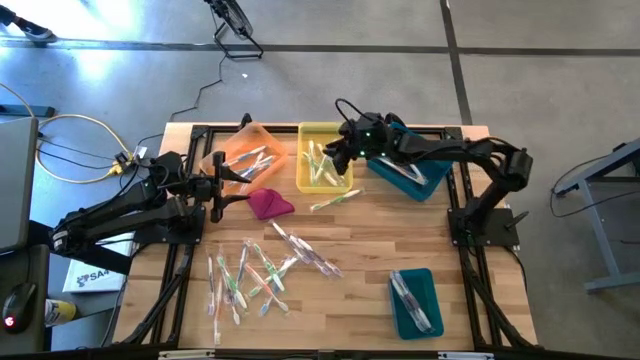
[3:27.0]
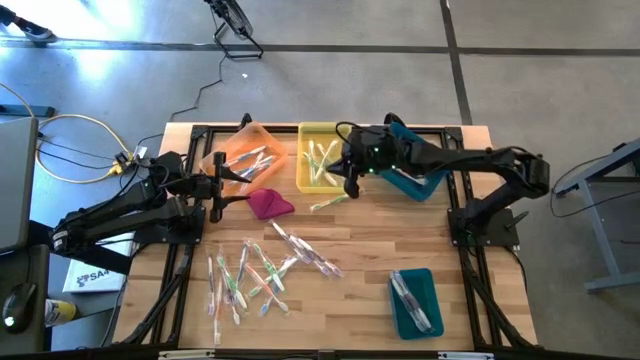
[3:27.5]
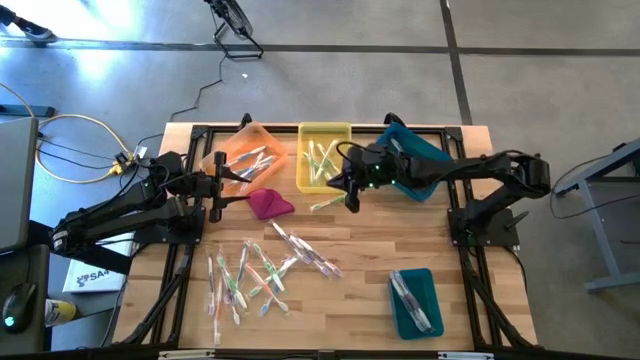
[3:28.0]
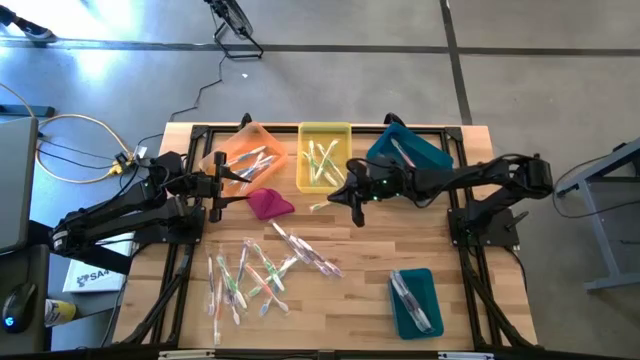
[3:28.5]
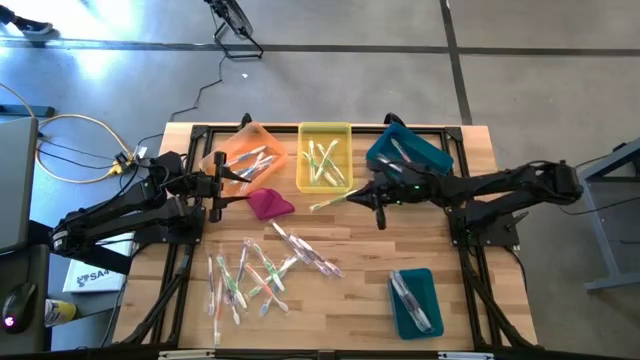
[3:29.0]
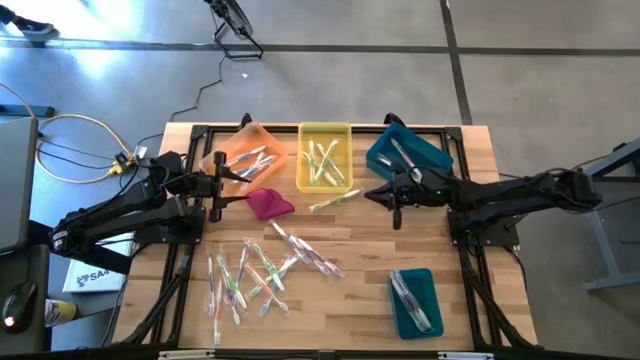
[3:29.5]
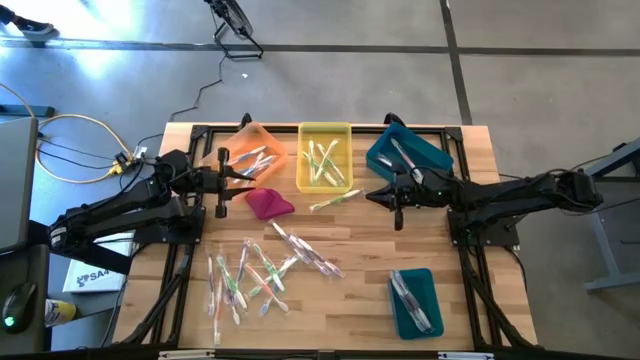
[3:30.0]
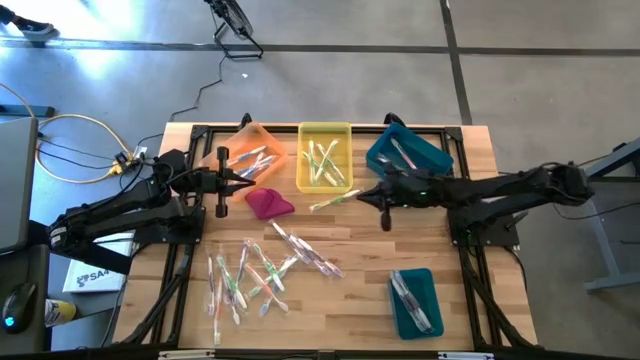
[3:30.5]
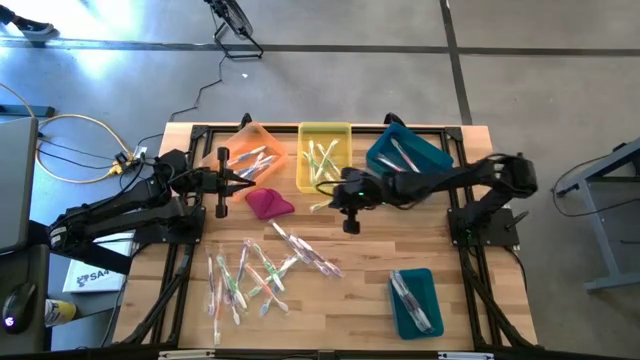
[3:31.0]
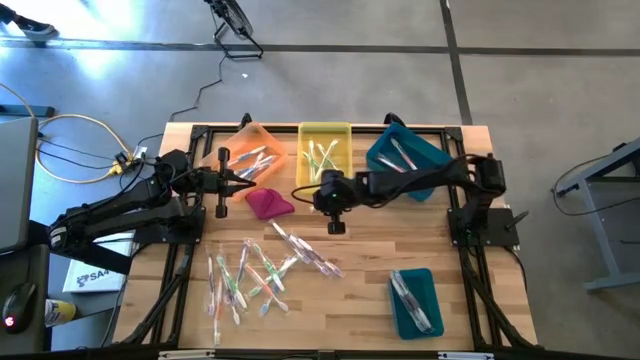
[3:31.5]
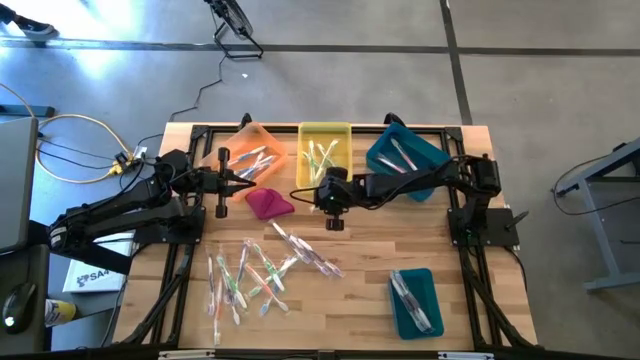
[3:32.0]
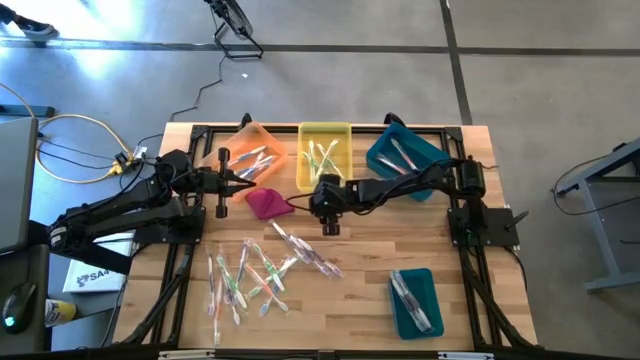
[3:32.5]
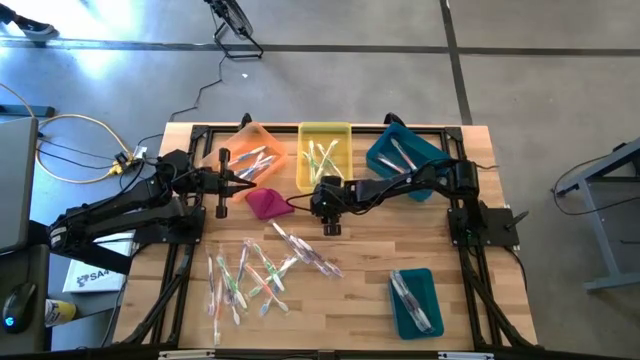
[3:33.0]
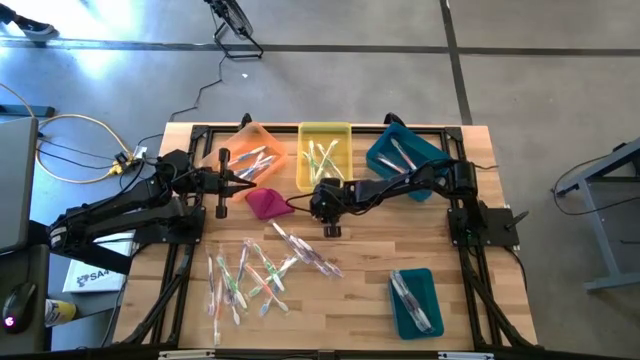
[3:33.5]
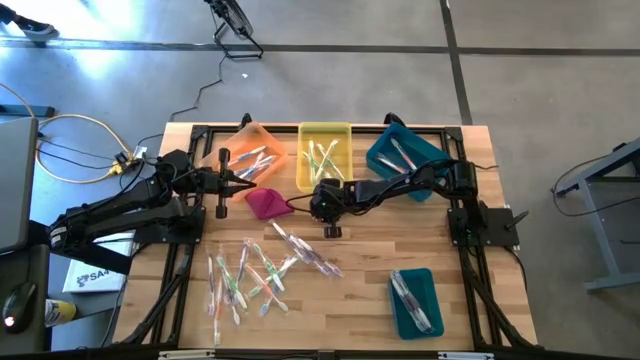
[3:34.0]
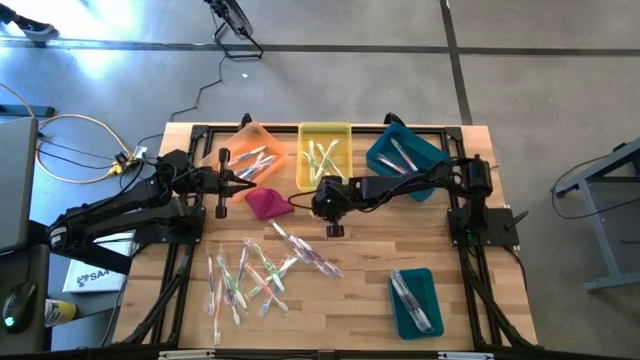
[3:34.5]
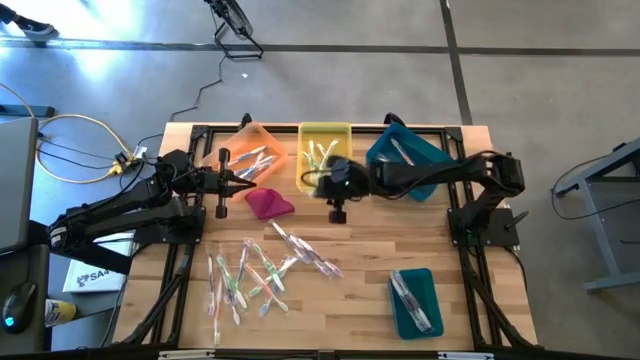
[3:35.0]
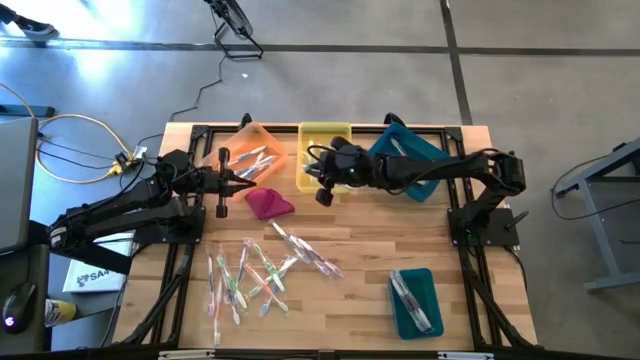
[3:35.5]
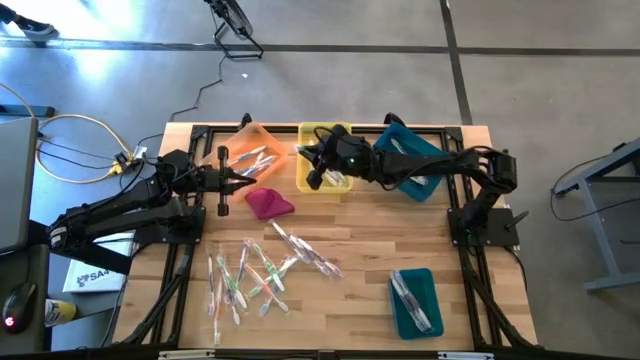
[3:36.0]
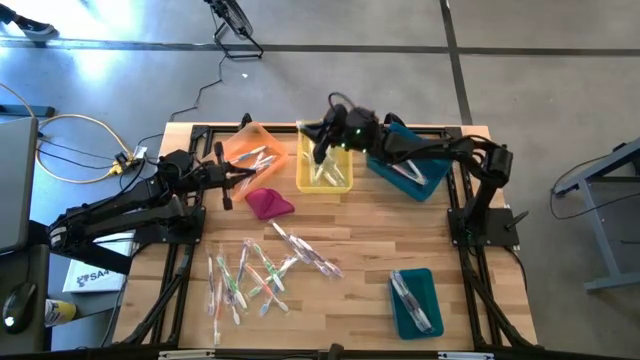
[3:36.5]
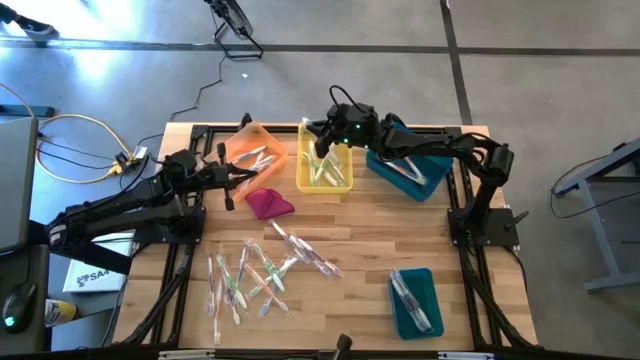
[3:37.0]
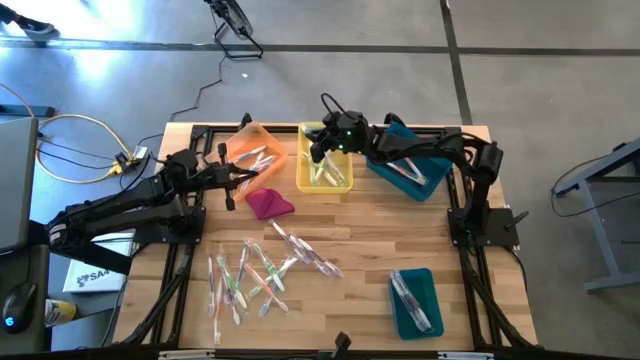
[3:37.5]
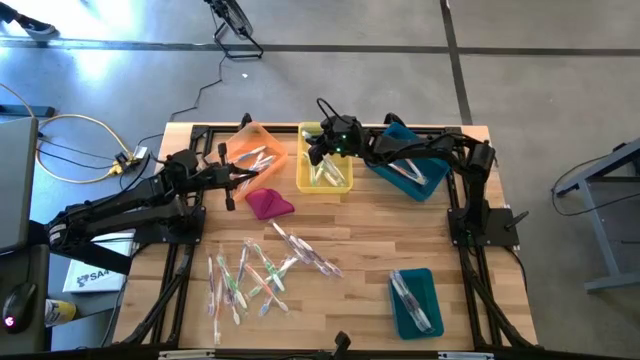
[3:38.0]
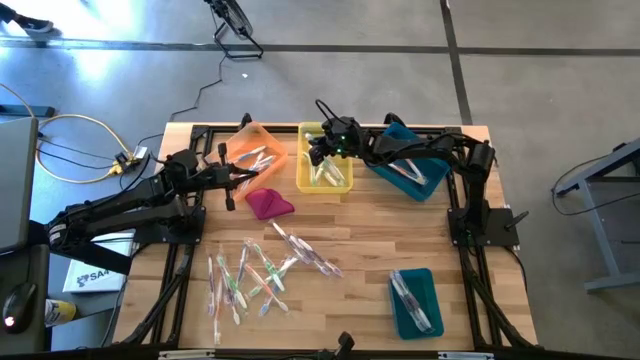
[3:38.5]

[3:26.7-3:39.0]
Task: Pick & Place Toothbrushes
Put the green toothbrush into the yellow bin

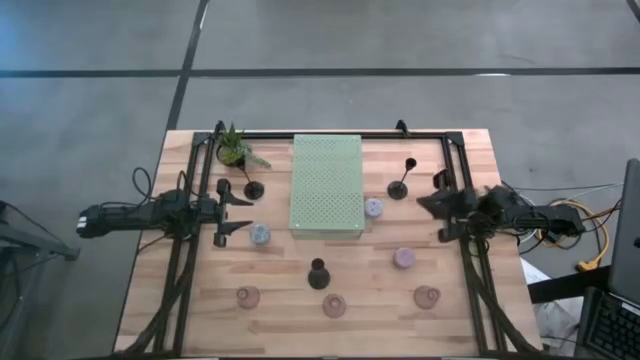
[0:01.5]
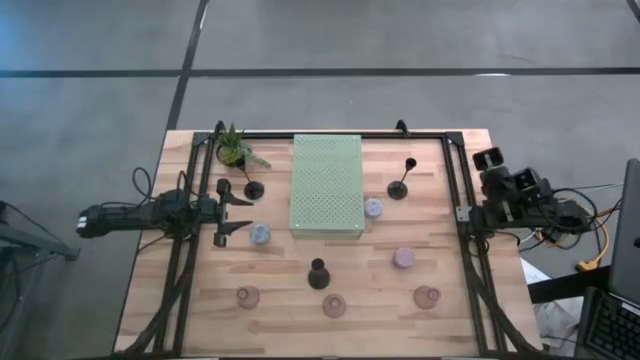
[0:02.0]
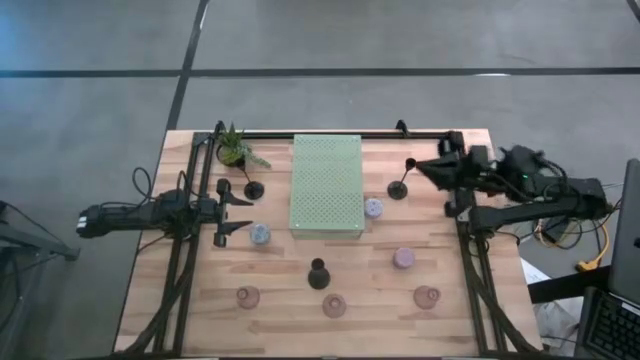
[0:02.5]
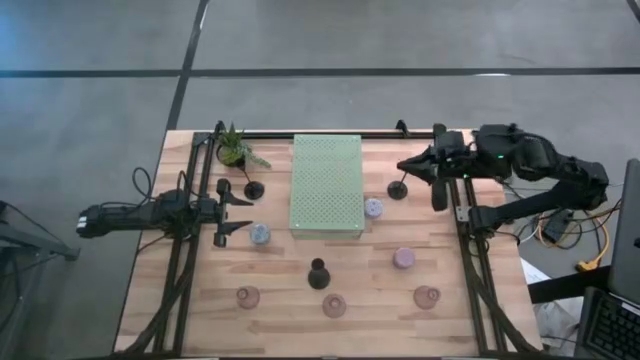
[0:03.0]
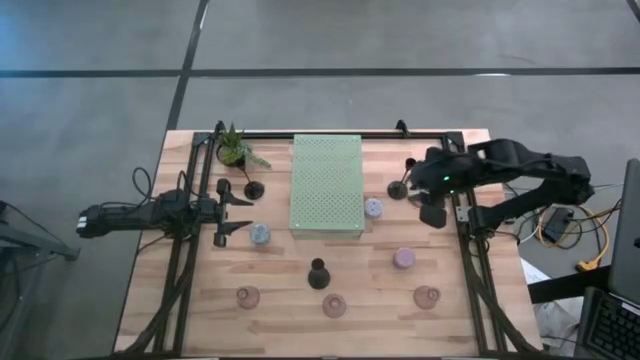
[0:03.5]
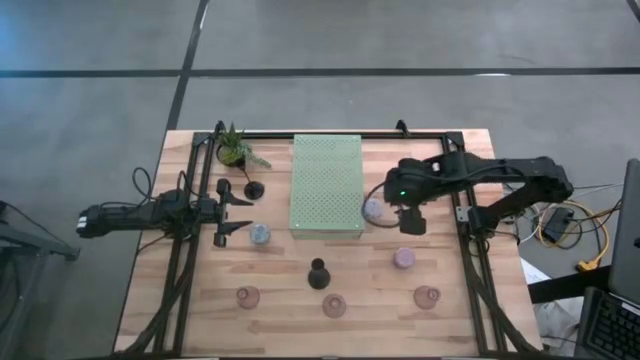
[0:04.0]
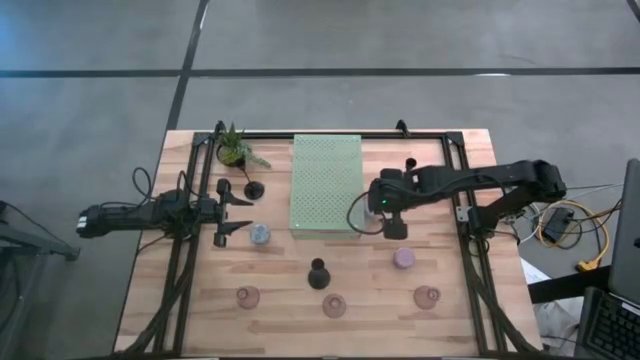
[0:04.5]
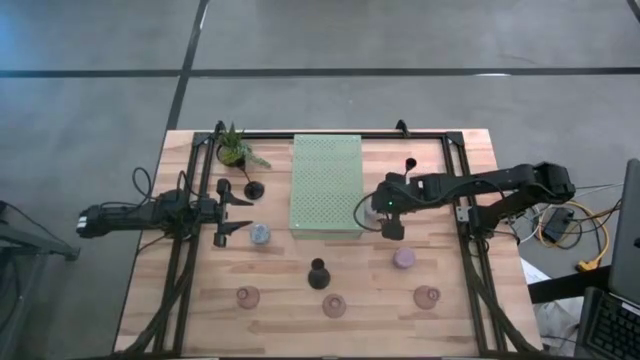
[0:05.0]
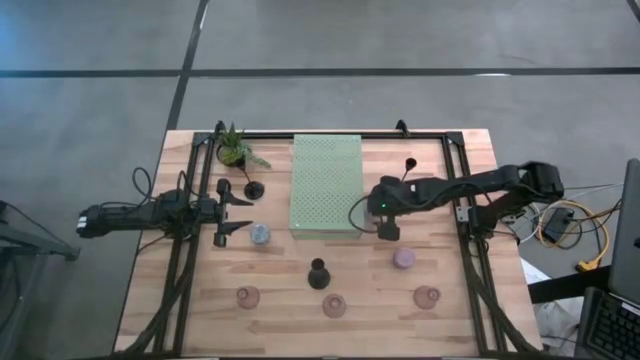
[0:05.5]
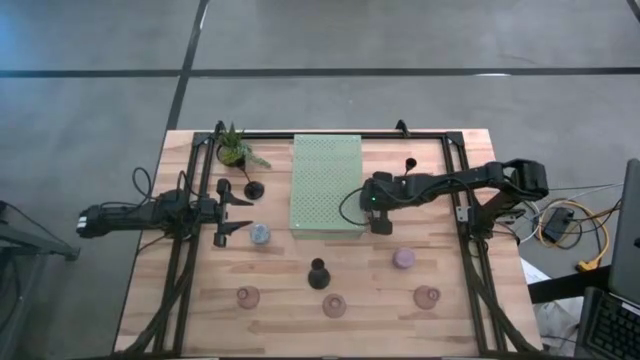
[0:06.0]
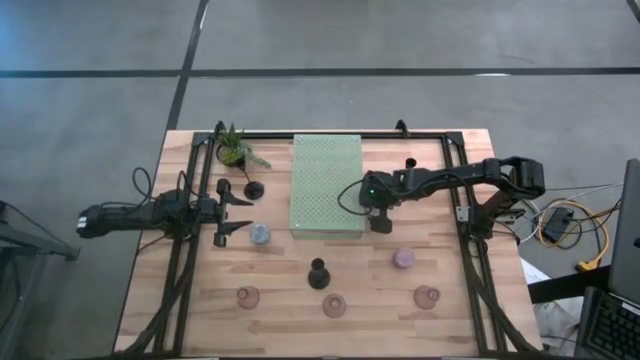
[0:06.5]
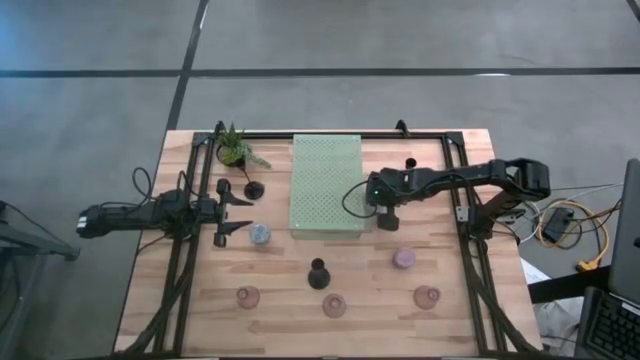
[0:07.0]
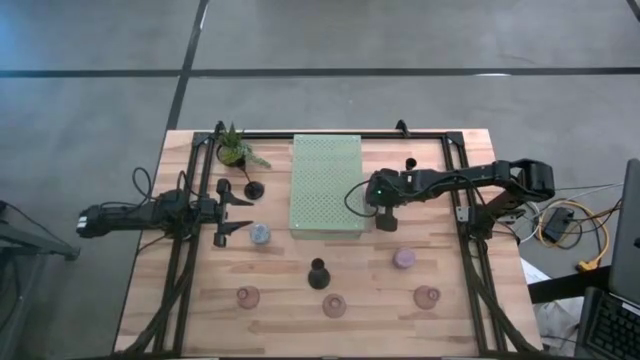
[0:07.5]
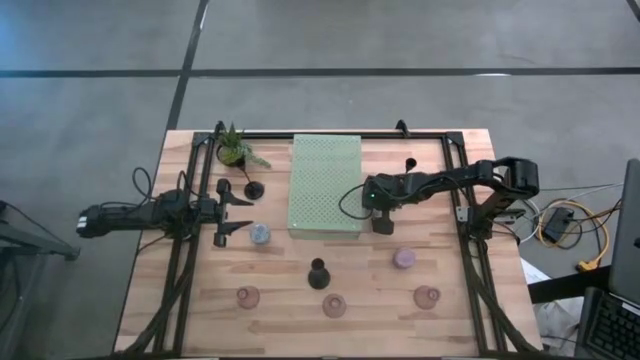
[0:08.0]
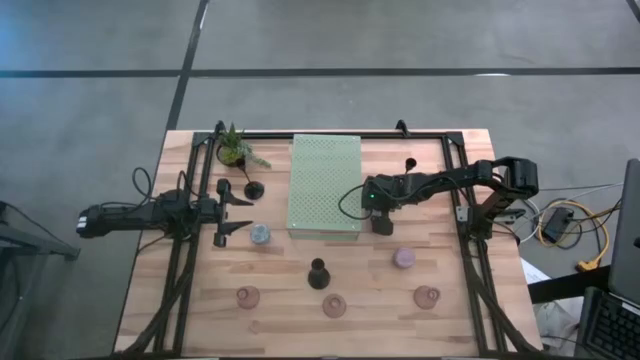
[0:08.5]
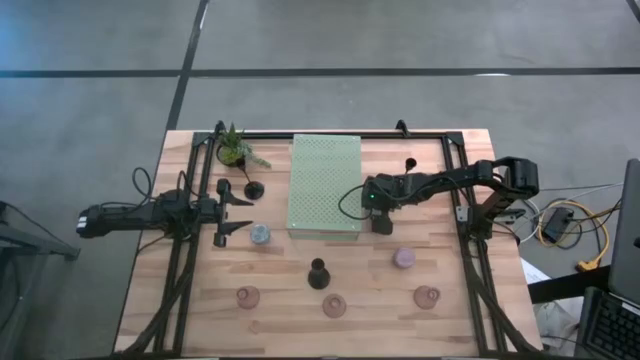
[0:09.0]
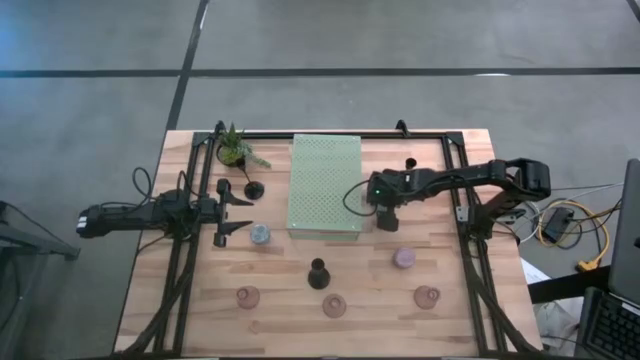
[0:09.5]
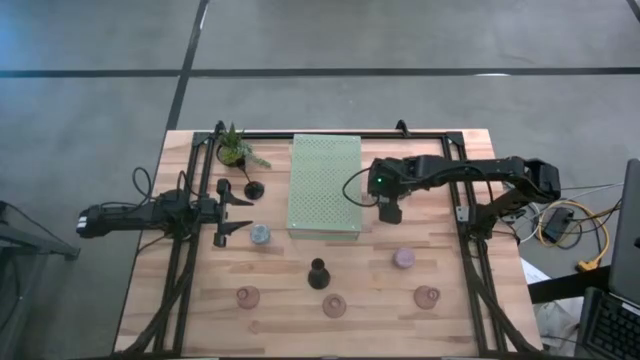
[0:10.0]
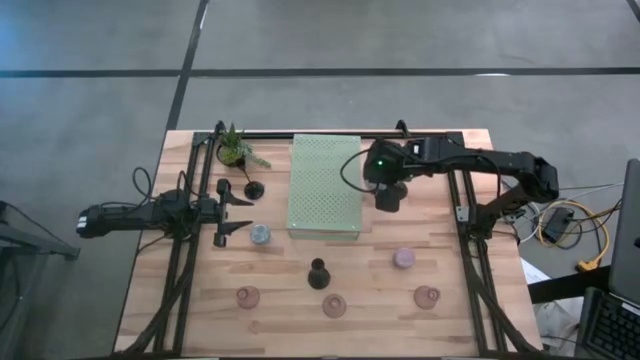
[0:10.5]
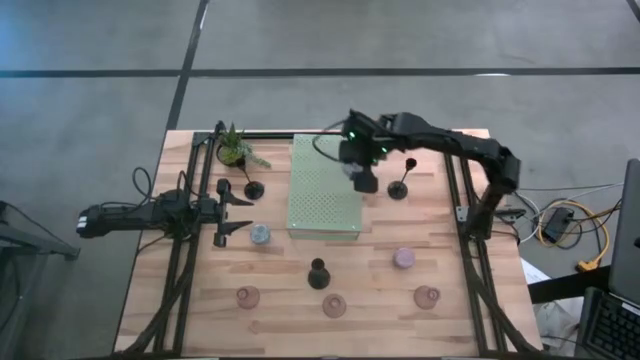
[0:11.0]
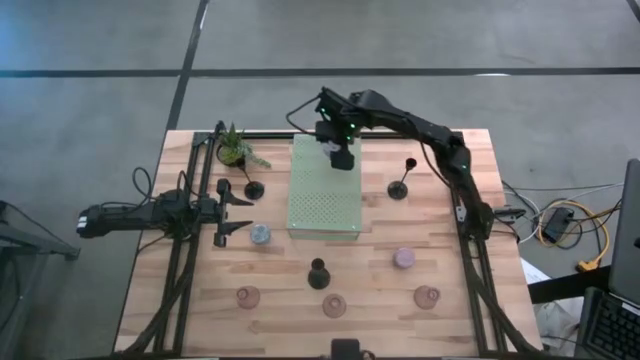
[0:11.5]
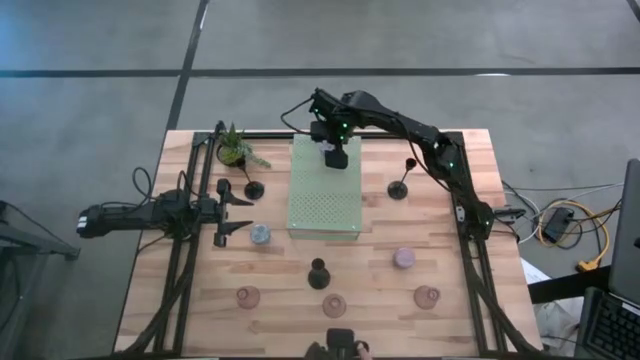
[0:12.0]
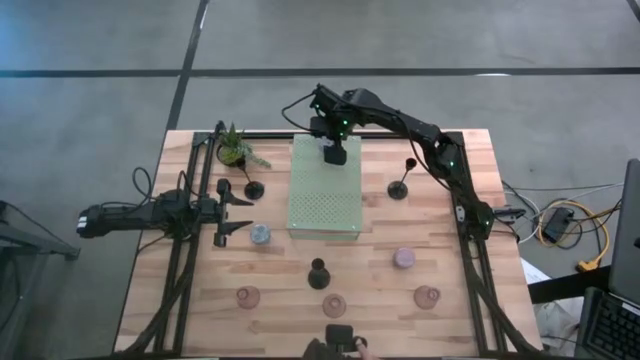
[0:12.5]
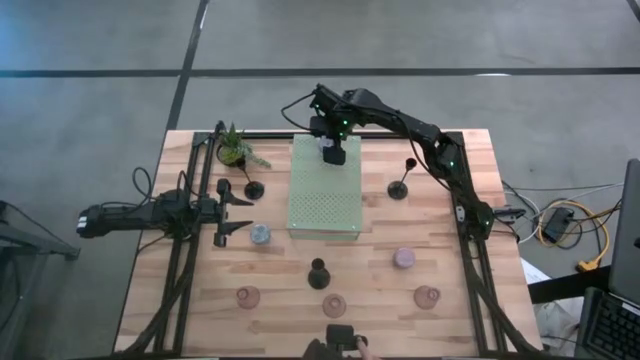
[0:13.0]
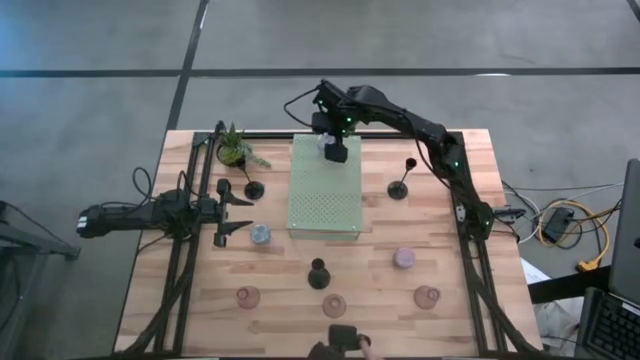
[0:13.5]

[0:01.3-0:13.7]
Task: Pick & Place candle stick holders
Put the red and white scented candle on the shelf
